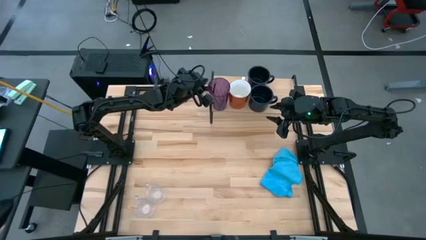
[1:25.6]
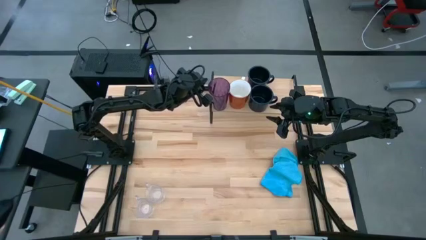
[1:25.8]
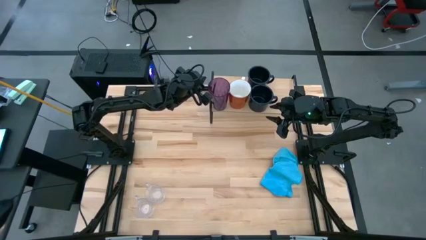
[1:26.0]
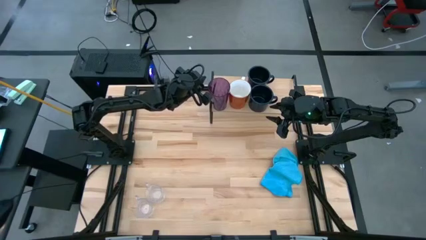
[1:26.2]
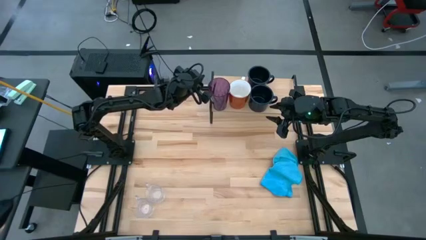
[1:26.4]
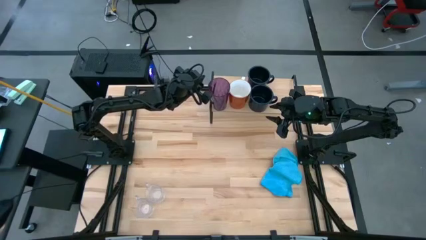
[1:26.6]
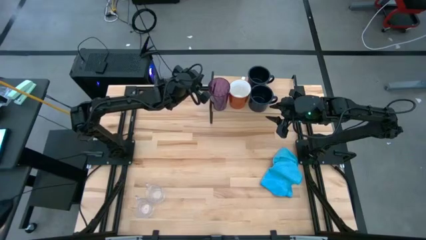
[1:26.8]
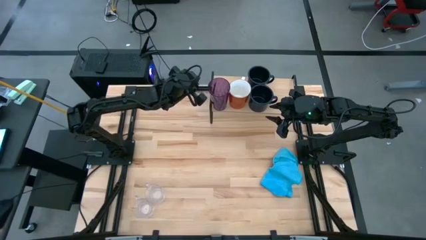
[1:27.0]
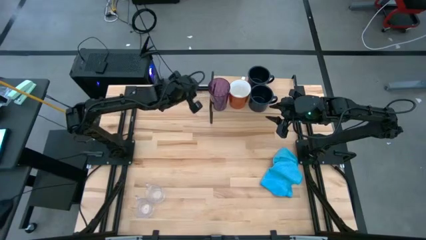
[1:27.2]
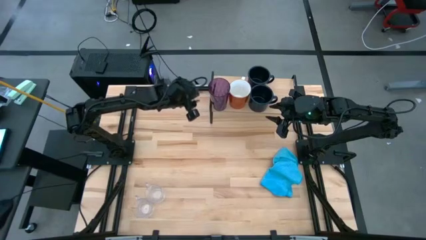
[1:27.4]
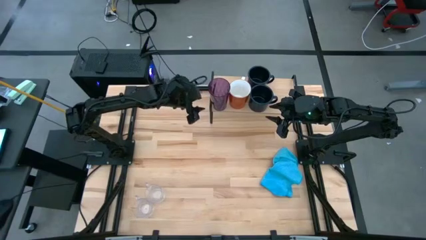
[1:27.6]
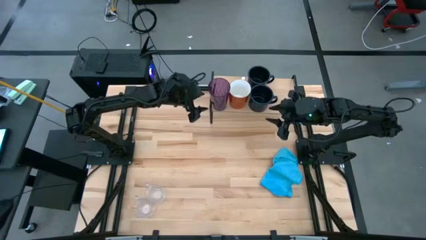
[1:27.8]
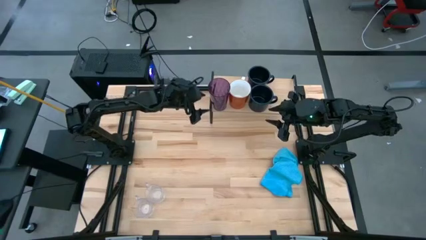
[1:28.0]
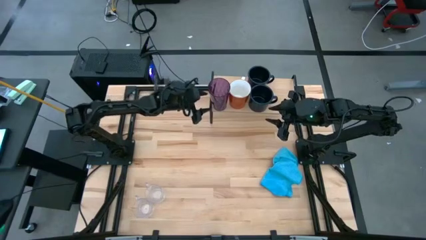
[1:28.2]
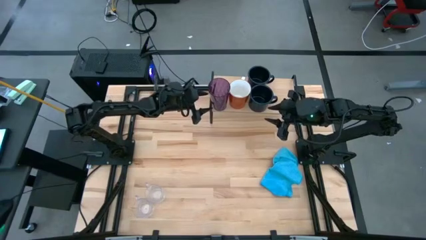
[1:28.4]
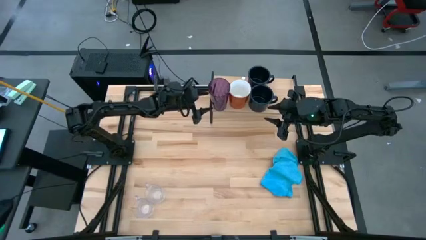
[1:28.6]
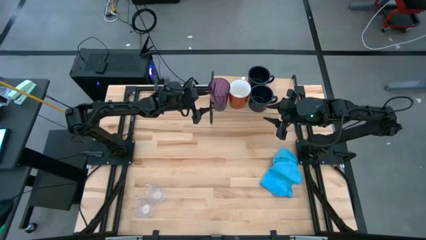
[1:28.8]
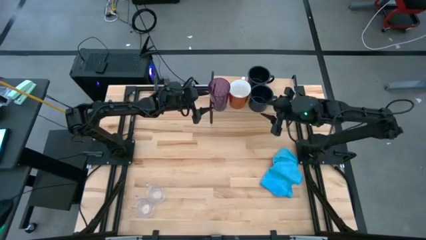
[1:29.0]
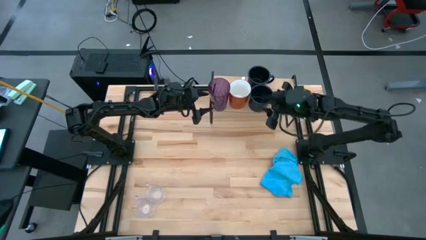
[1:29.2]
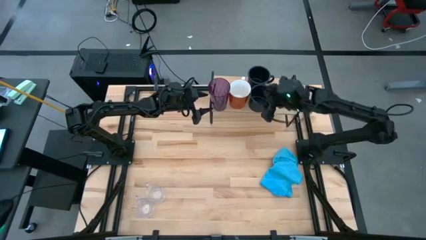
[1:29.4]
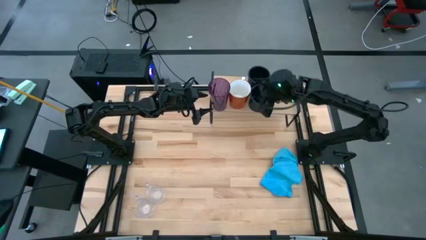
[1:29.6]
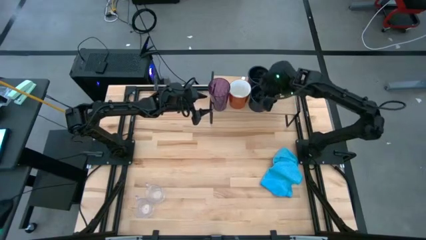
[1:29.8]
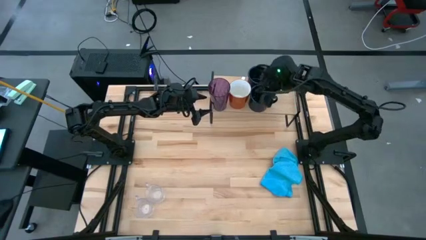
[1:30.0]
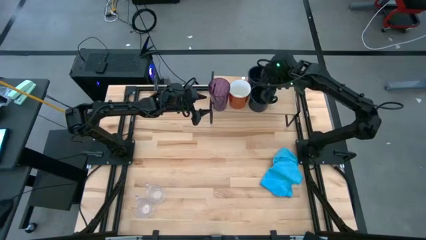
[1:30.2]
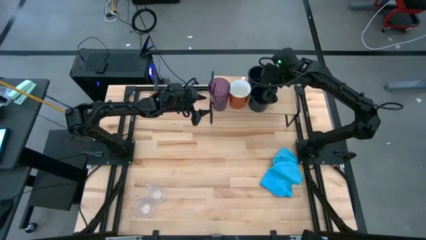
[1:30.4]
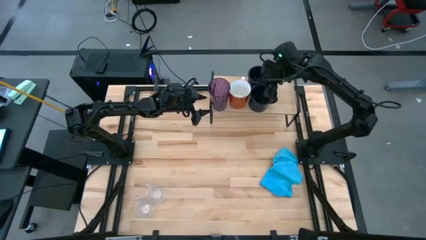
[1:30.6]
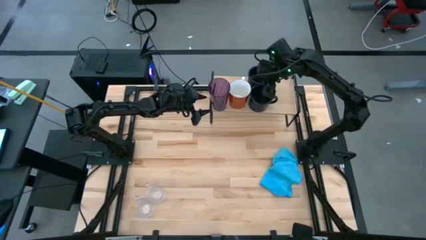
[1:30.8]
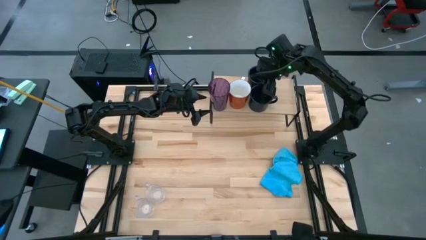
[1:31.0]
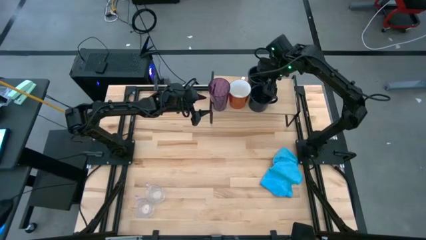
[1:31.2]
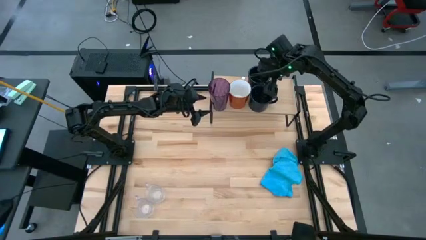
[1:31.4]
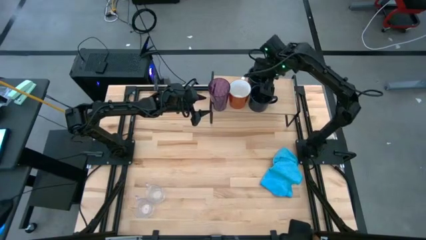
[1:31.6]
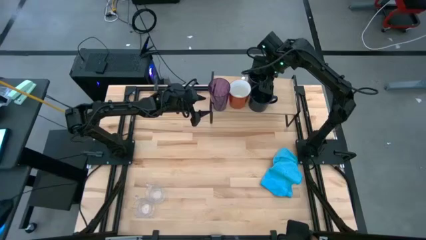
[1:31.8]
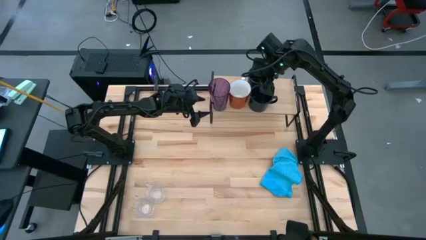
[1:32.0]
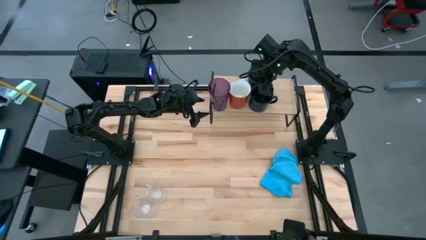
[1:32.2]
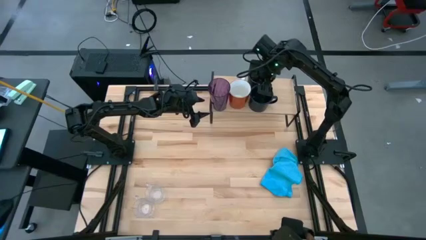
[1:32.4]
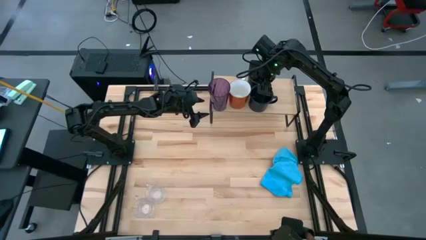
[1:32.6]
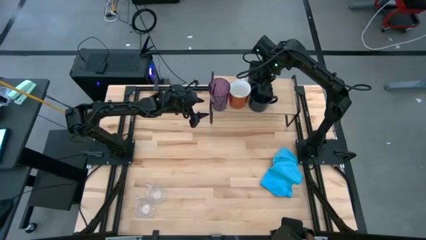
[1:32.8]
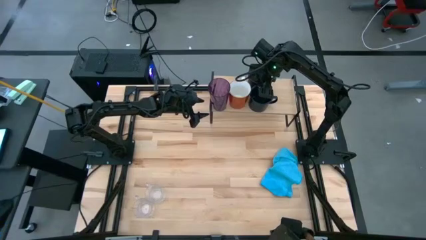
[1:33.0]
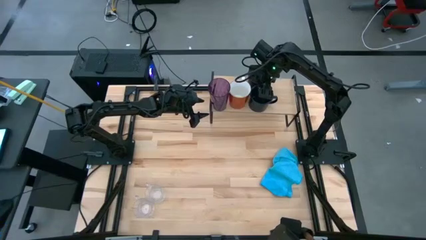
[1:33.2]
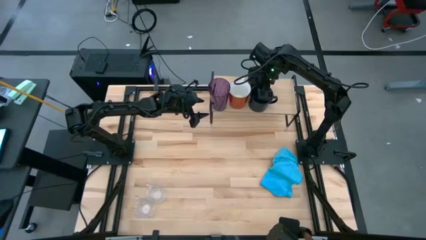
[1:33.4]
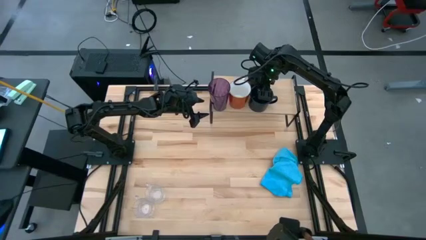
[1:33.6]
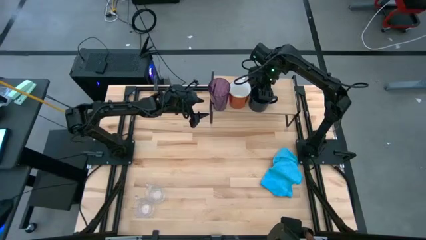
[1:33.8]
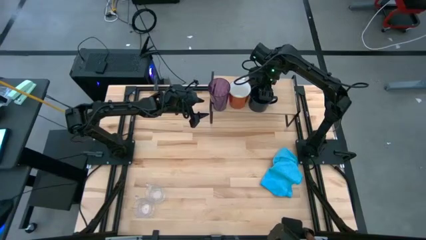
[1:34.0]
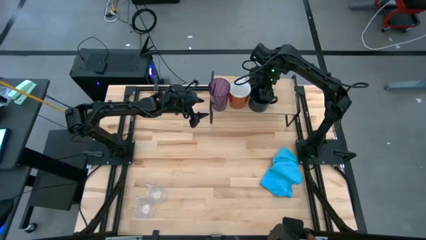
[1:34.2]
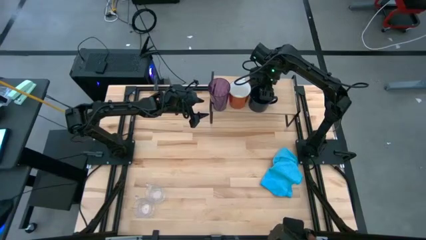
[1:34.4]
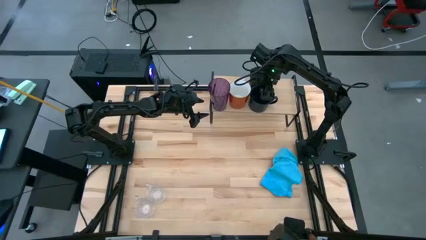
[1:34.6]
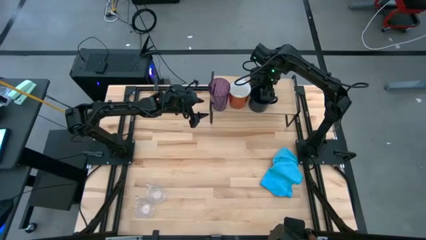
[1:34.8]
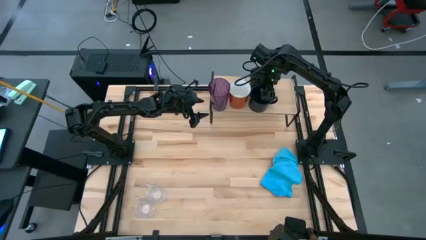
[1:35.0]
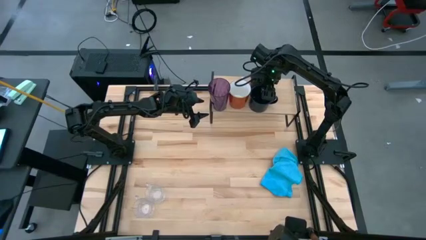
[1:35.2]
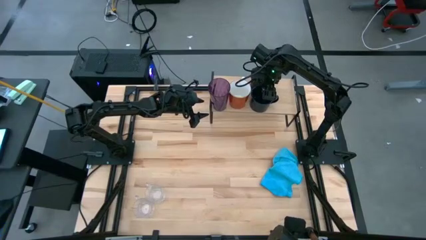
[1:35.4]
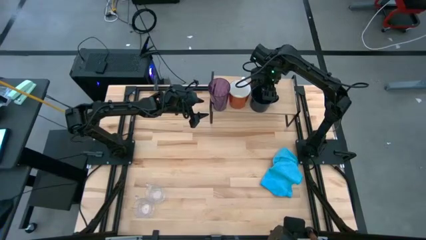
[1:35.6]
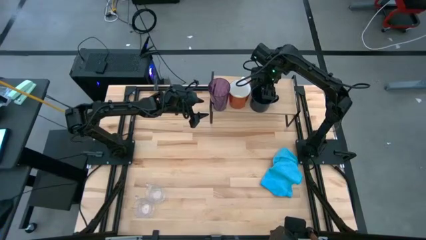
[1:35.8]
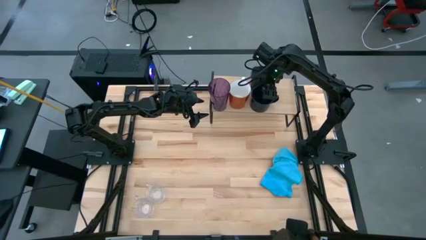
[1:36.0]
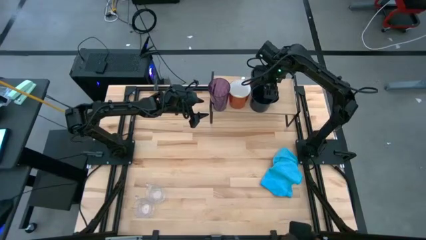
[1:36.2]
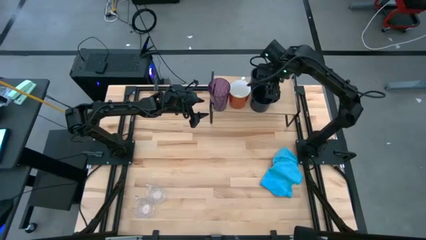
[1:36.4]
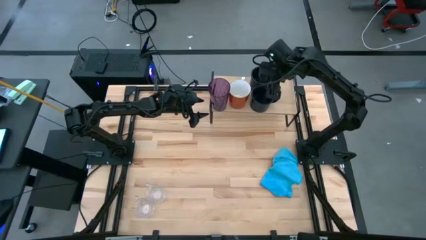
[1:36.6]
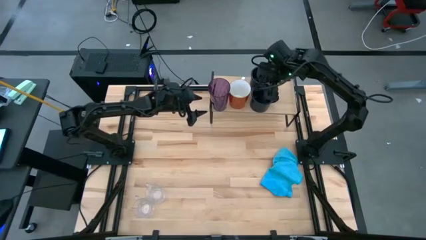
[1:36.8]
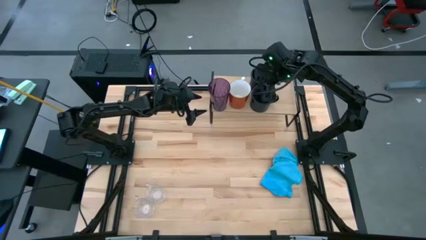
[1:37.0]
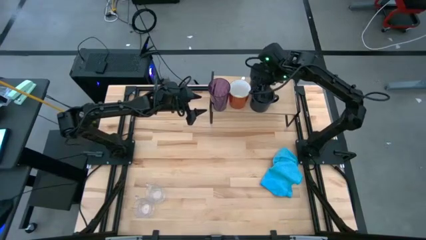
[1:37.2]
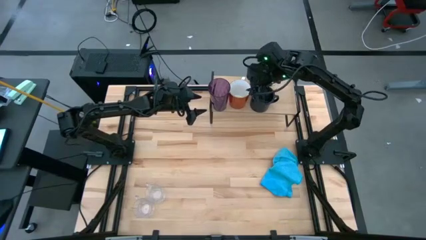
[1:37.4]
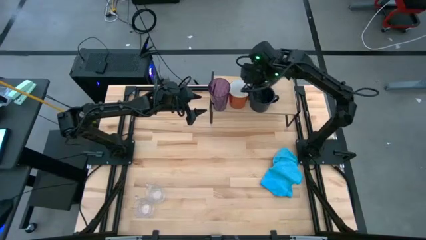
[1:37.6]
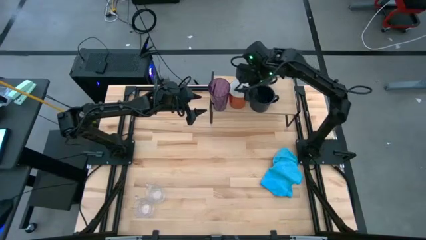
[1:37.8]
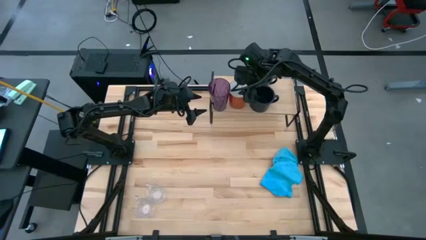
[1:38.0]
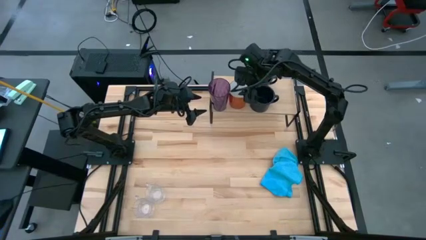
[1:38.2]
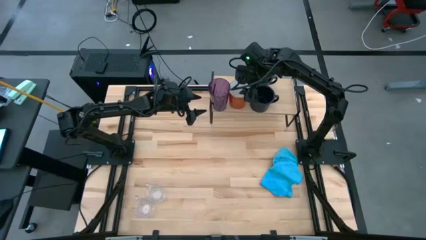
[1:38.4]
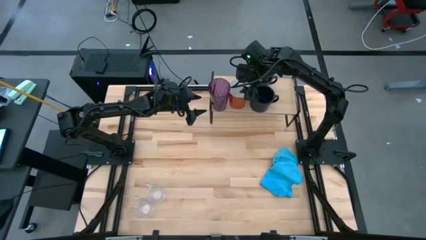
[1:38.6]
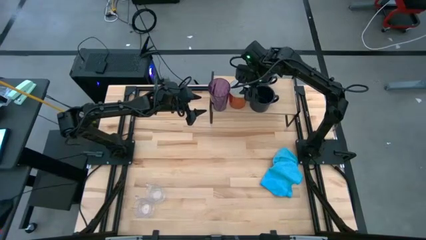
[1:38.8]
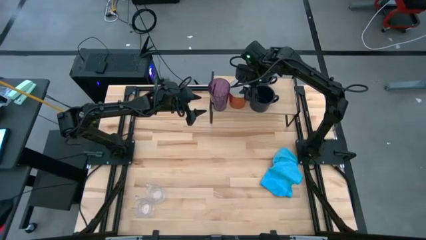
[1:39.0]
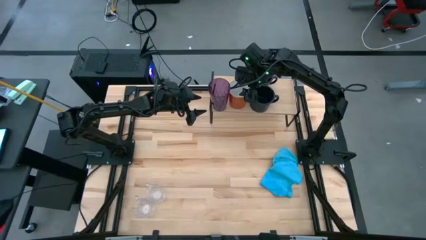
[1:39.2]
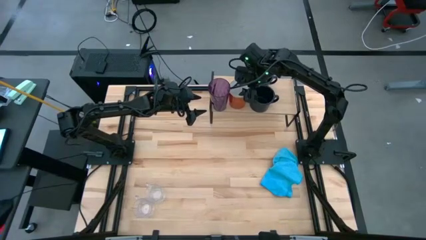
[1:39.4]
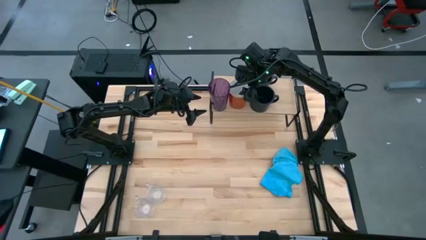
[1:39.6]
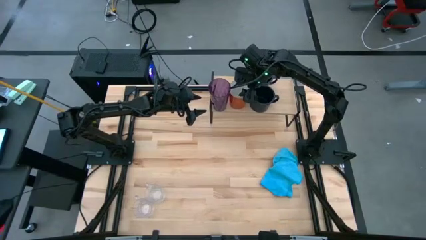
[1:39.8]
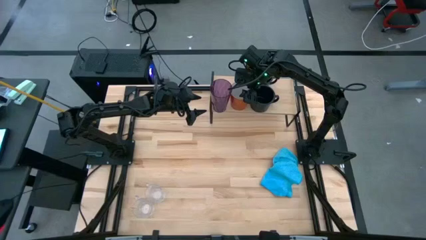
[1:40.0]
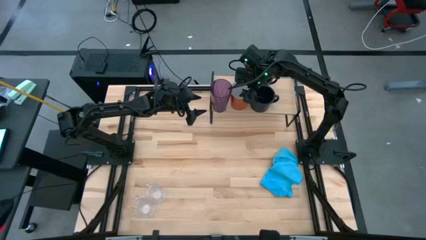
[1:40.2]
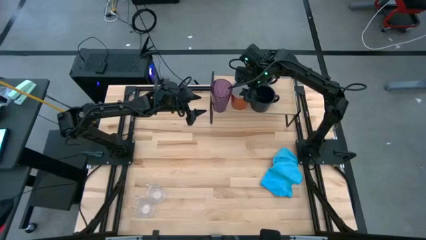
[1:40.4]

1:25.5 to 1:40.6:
Task: Stack small to large cups/mugs on shelf
Adjust the mugs on the shelf

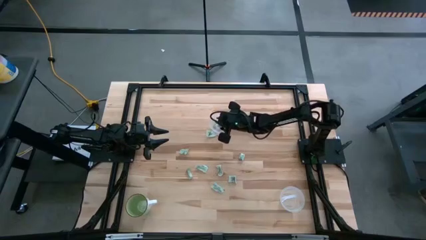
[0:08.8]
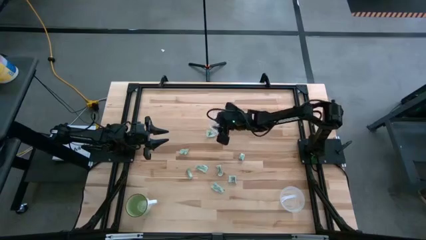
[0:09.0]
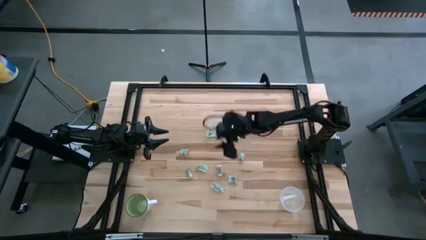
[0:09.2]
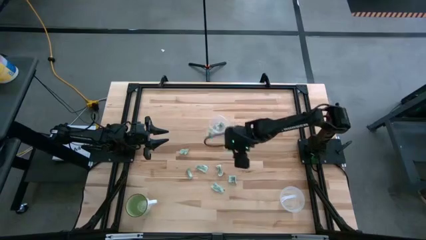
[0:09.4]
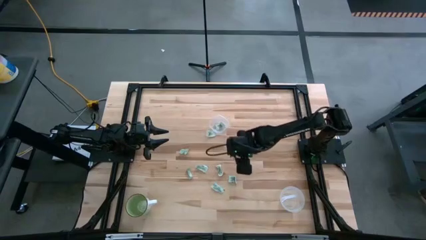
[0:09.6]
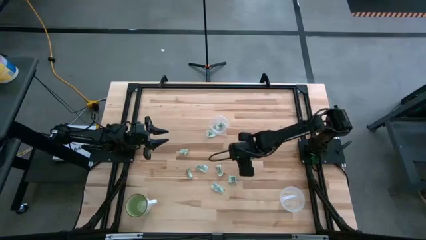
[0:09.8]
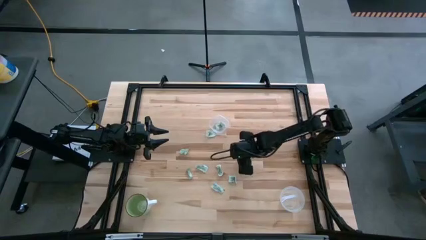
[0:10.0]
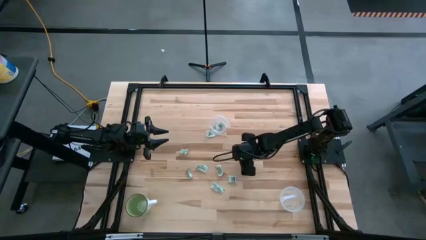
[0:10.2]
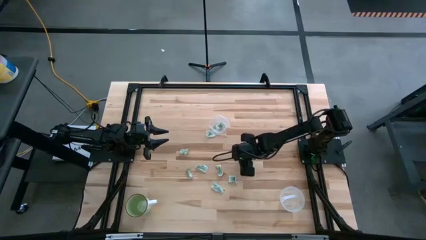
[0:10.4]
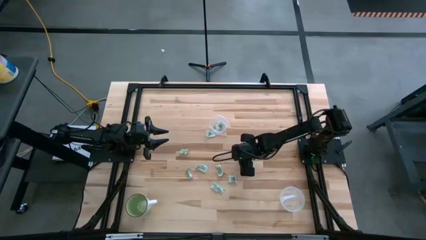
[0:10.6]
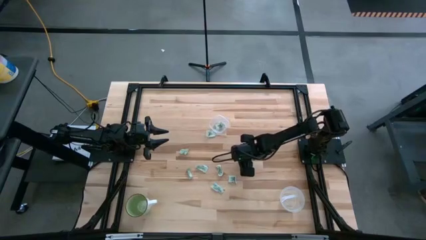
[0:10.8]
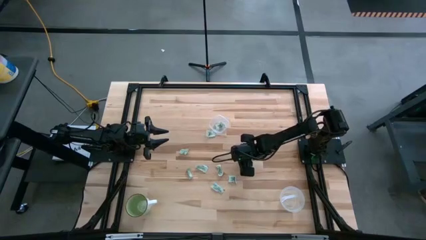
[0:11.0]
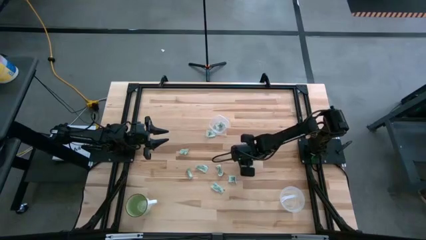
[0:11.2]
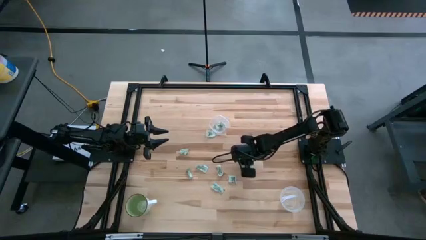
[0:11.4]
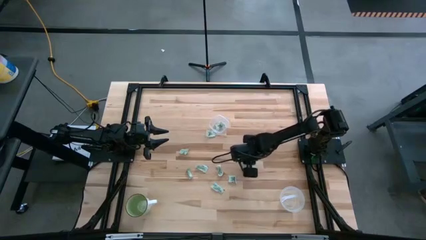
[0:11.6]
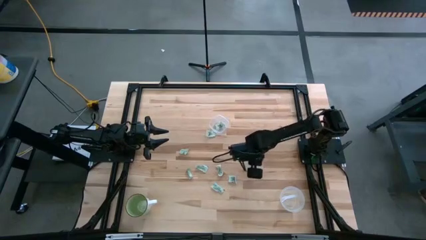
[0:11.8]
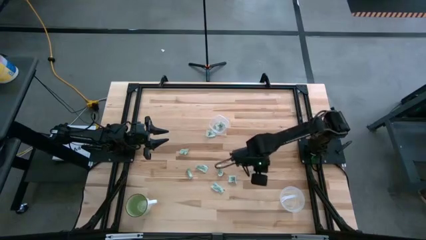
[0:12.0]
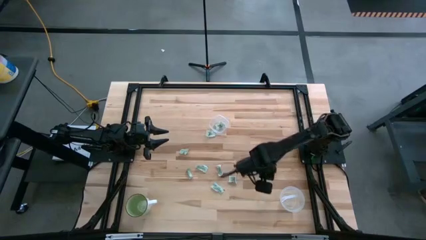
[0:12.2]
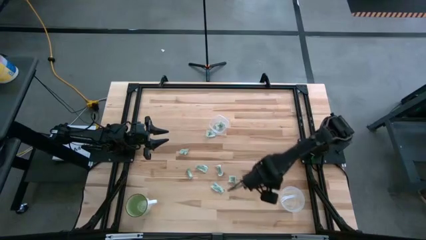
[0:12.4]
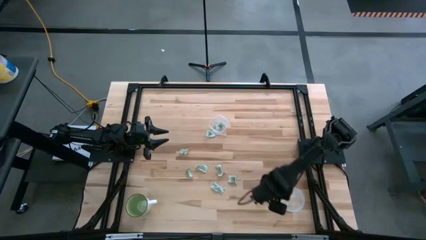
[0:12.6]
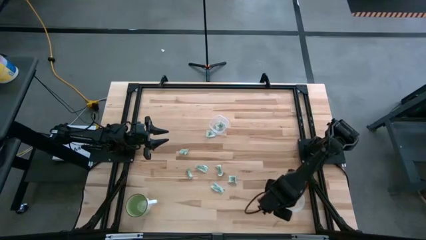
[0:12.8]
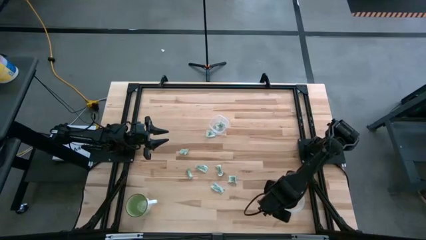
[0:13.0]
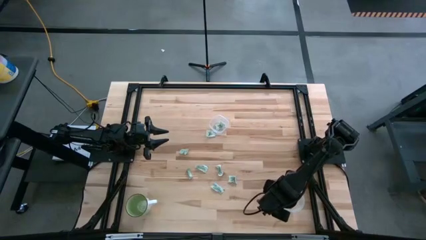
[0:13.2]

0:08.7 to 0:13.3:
Task: Pick and place items into bin
Put the green stevia packet into the circle transparent bin
